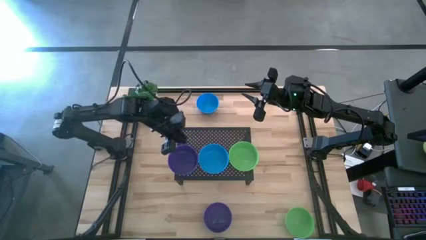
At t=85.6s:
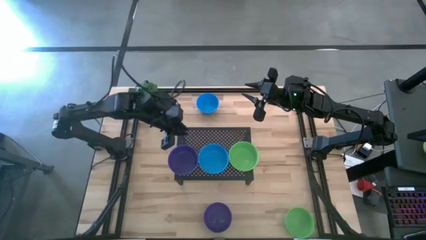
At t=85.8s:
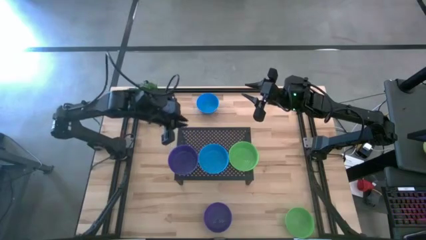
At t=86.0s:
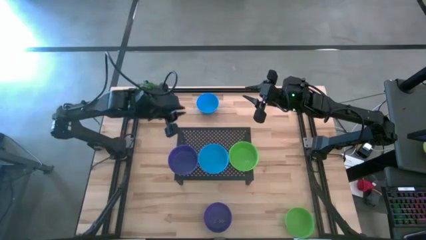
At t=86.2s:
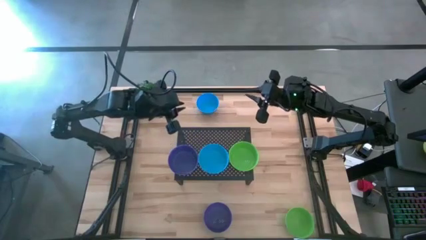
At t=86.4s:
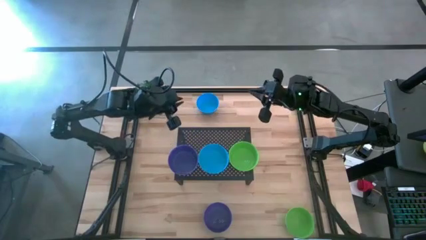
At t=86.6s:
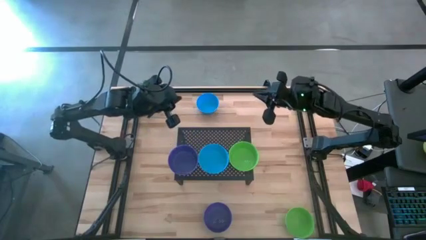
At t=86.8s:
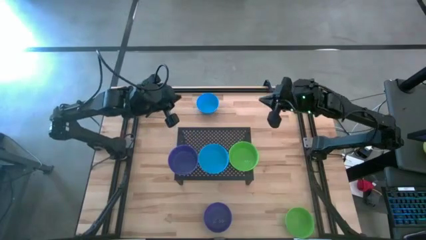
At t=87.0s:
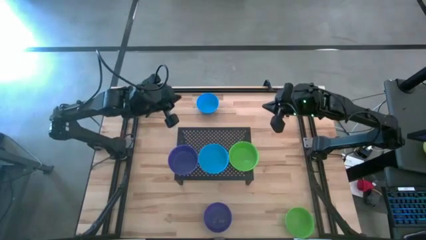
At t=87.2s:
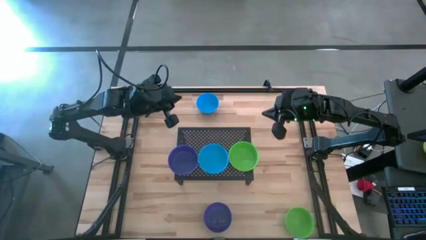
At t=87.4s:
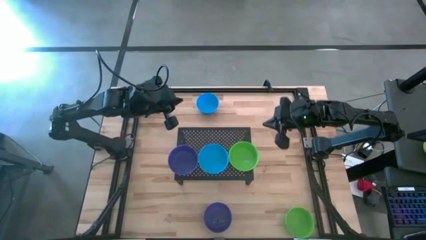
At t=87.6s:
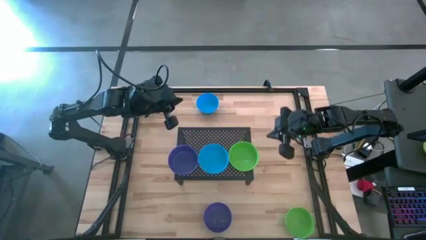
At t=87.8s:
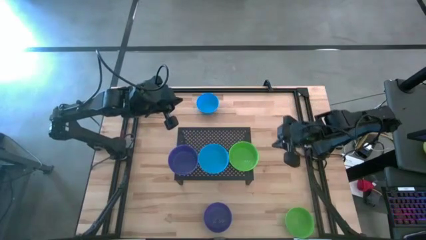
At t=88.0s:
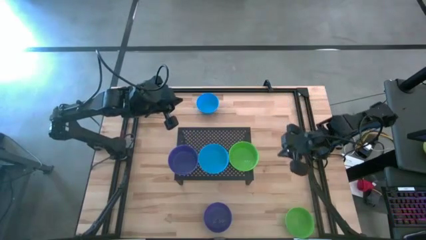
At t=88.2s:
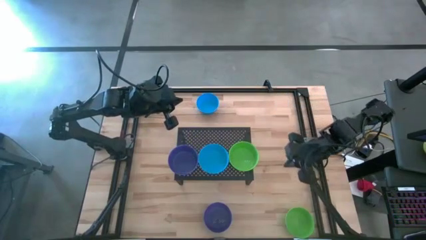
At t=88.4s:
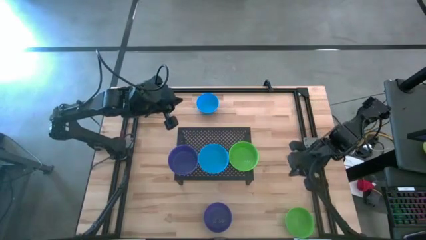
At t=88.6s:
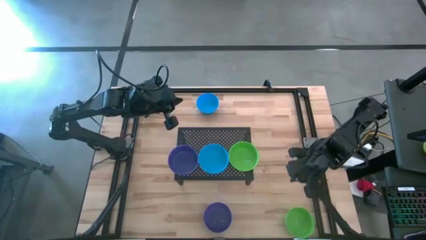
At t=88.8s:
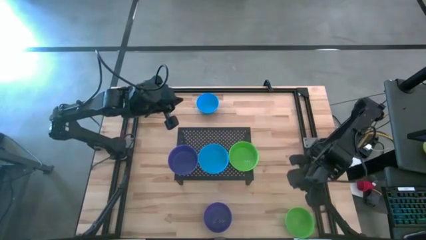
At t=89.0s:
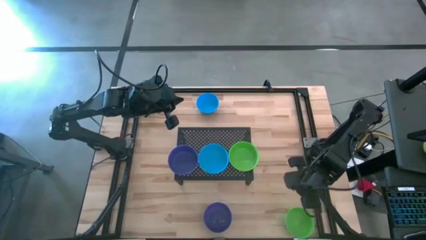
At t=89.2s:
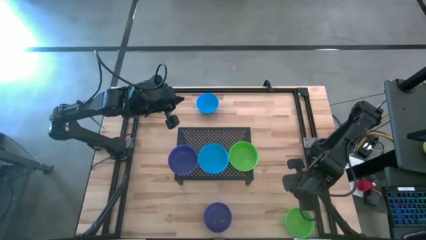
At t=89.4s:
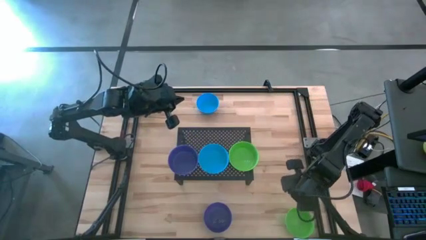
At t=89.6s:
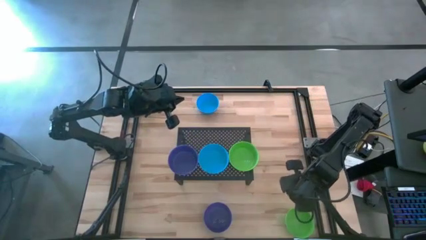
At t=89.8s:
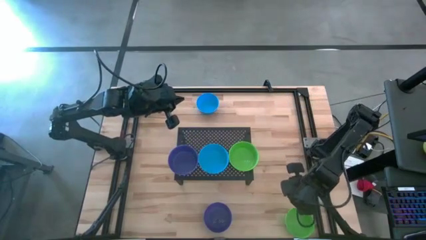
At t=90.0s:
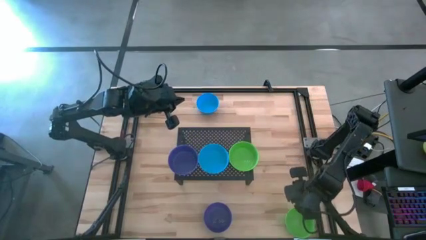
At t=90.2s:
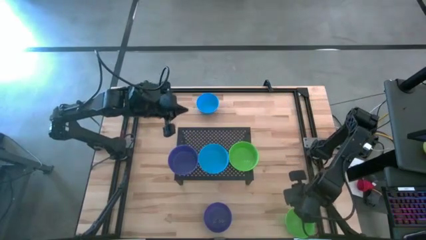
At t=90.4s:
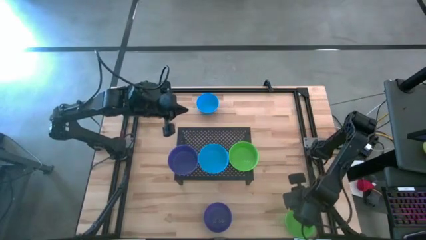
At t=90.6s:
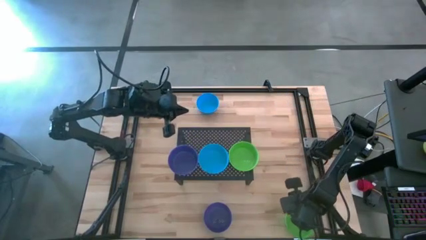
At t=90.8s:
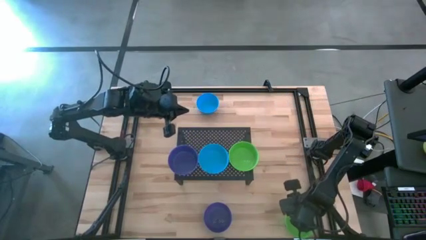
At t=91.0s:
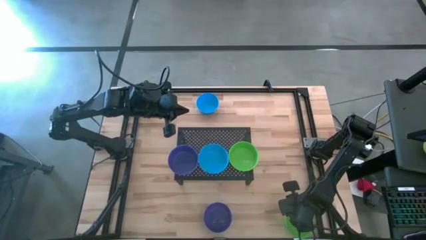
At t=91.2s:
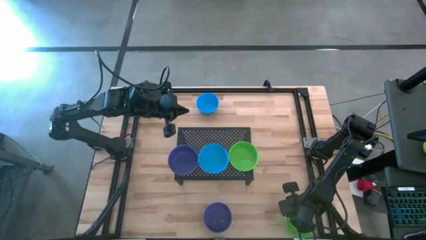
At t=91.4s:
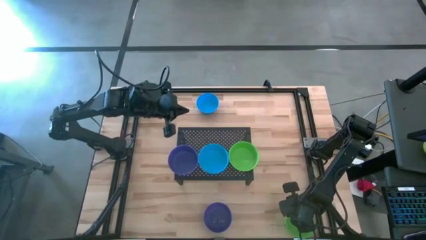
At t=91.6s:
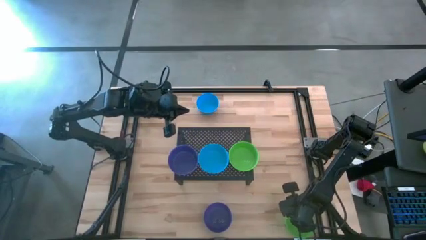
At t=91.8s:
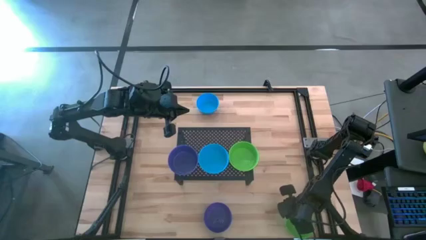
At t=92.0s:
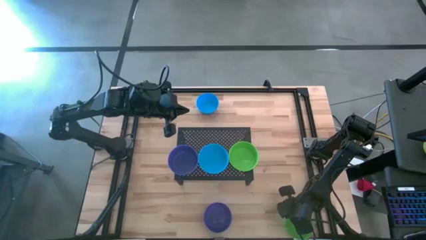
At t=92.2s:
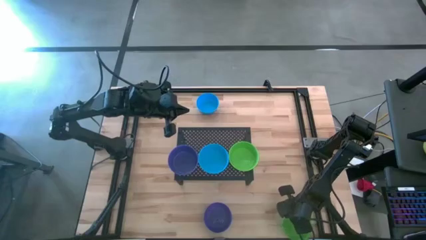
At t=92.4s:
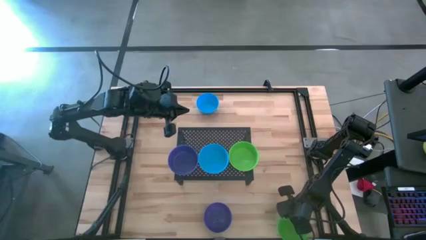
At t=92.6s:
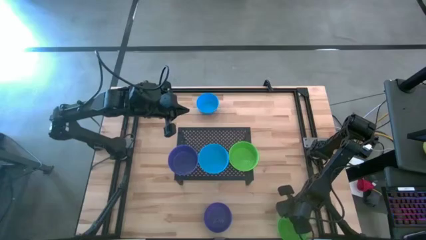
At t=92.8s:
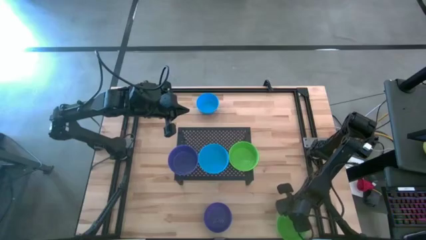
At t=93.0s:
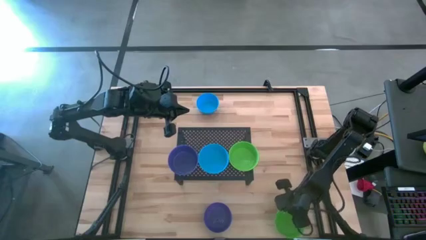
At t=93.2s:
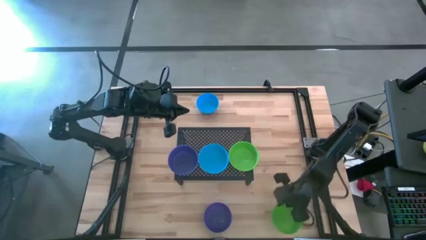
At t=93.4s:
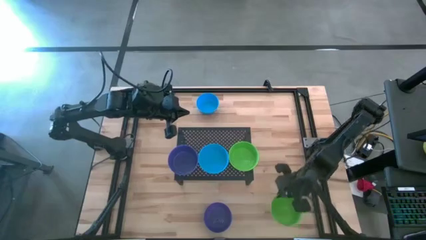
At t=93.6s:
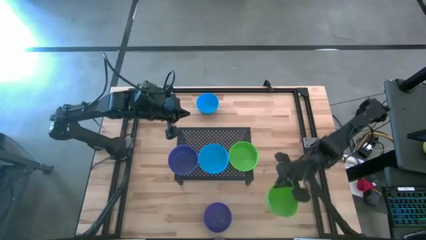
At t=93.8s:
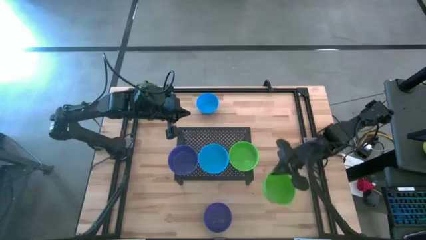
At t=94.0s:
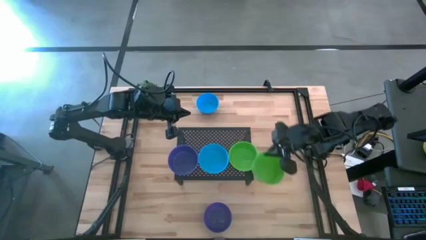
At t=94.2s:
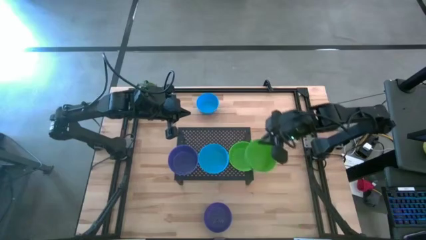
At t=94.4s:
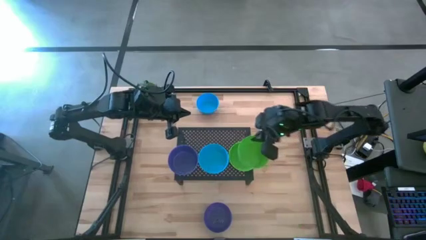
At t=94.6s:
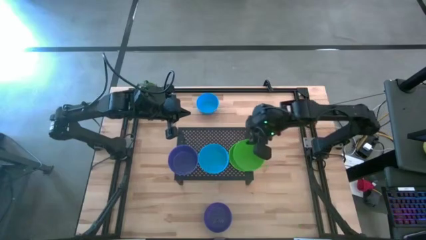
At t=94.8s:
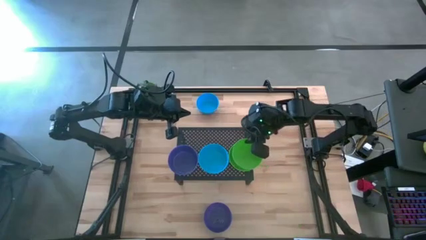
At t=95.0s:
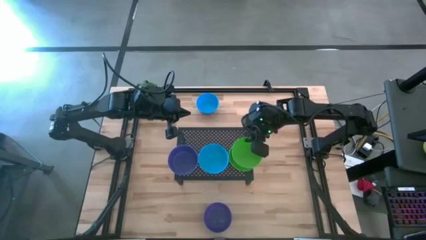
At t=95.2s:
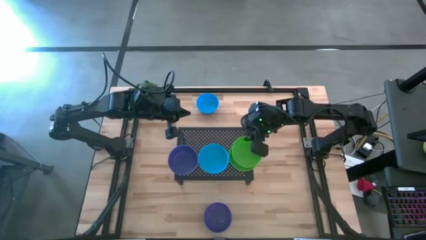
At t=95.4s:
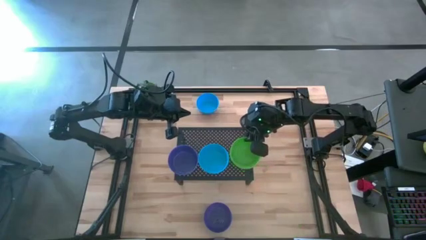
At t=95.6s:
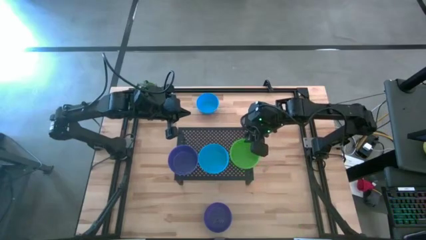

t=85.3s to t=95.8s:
Task: Pick & Place Mini bowls
Stack the green bowl on the green bowl on the shelf
